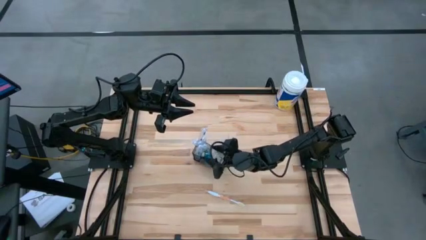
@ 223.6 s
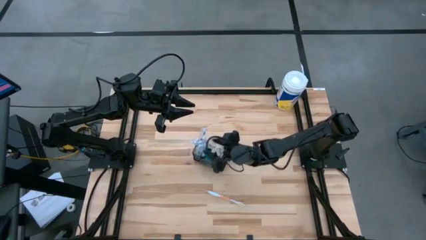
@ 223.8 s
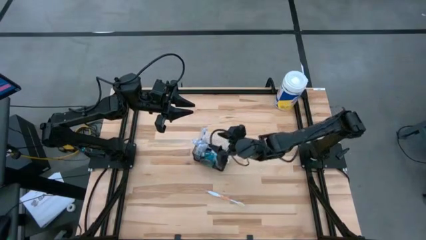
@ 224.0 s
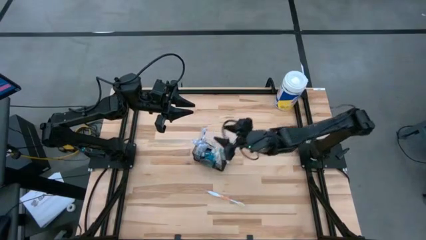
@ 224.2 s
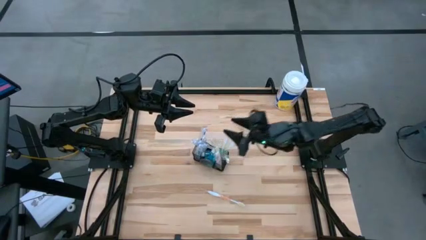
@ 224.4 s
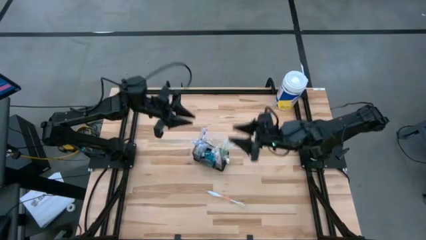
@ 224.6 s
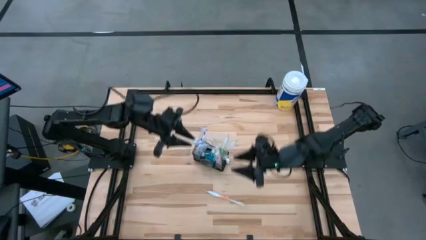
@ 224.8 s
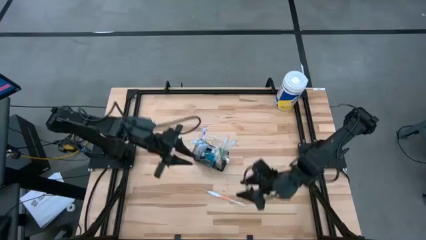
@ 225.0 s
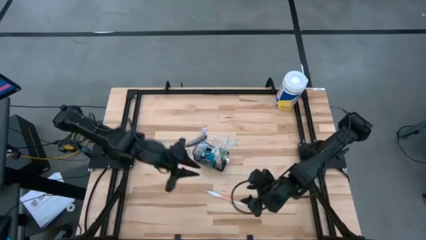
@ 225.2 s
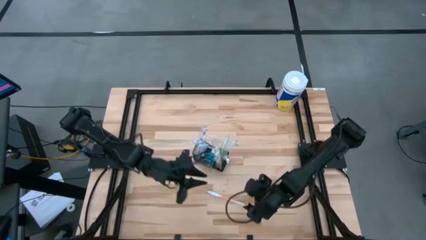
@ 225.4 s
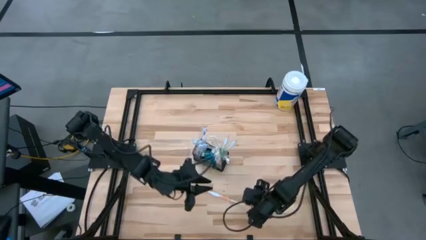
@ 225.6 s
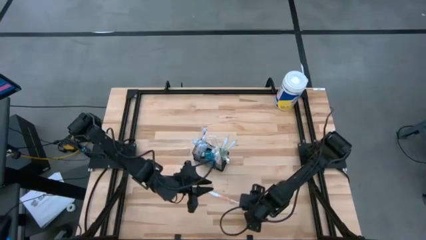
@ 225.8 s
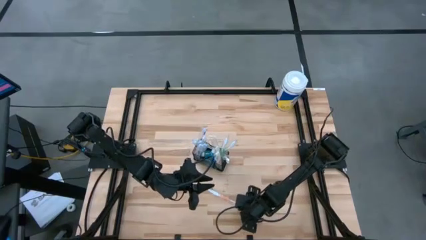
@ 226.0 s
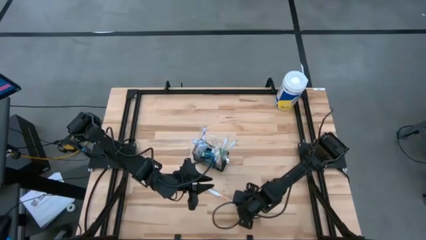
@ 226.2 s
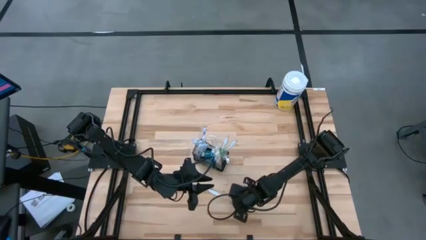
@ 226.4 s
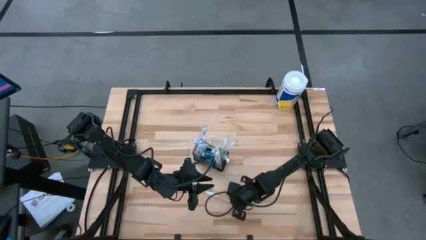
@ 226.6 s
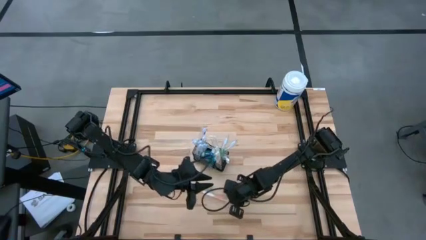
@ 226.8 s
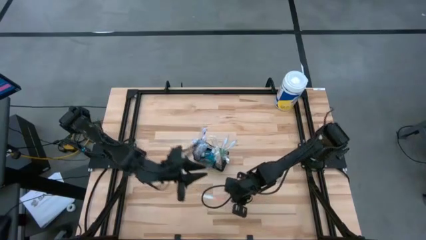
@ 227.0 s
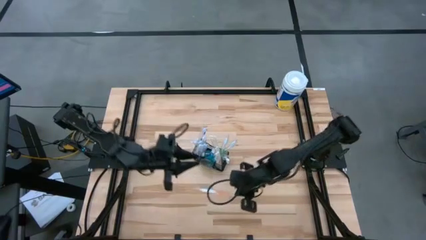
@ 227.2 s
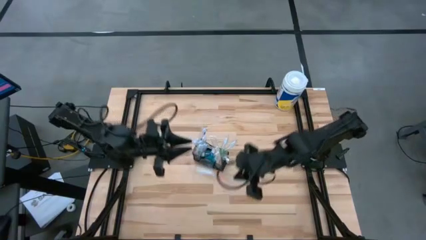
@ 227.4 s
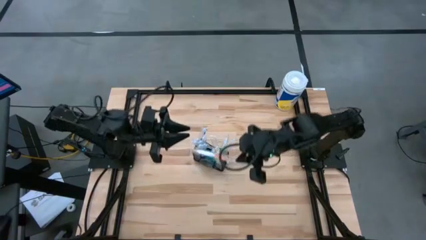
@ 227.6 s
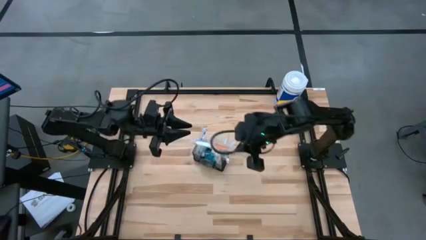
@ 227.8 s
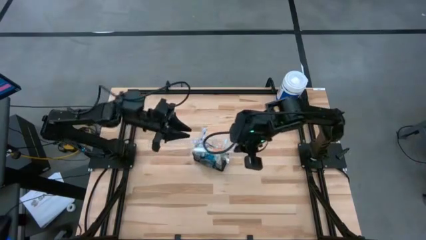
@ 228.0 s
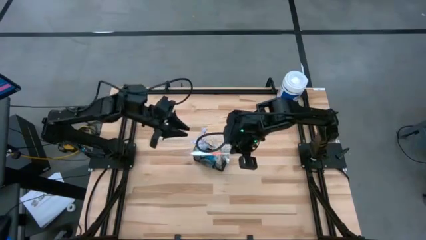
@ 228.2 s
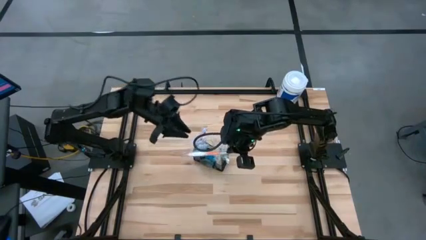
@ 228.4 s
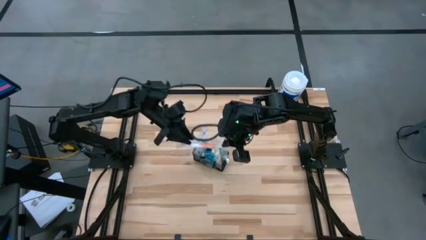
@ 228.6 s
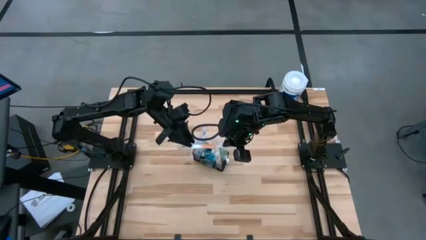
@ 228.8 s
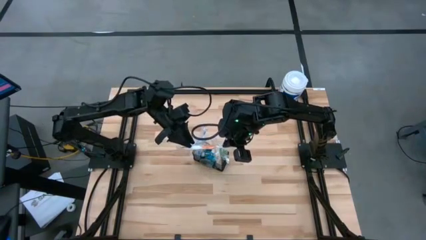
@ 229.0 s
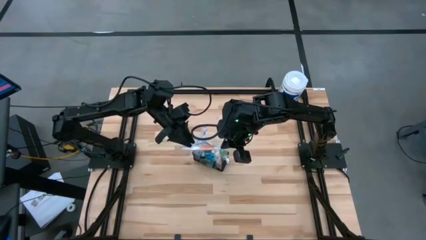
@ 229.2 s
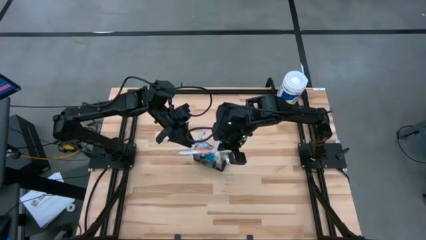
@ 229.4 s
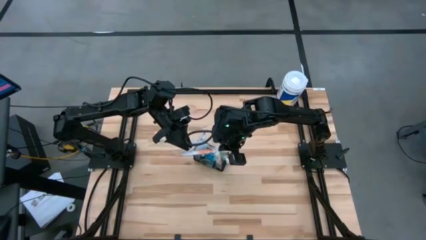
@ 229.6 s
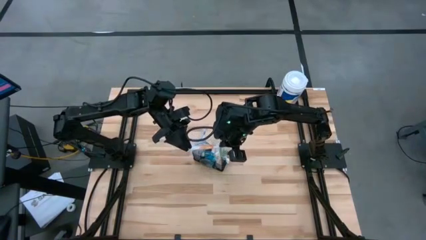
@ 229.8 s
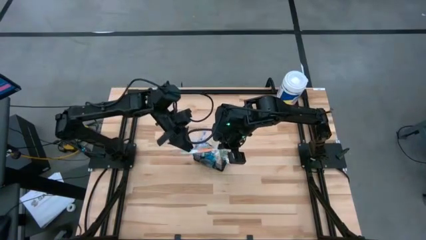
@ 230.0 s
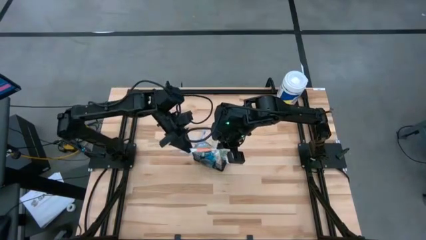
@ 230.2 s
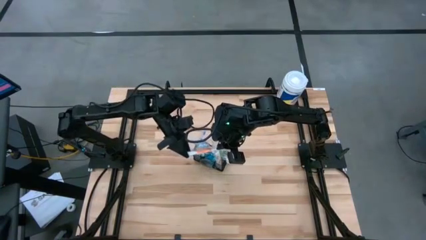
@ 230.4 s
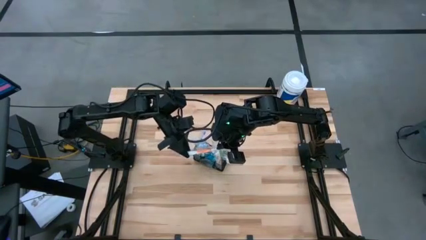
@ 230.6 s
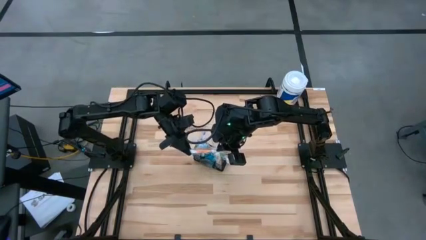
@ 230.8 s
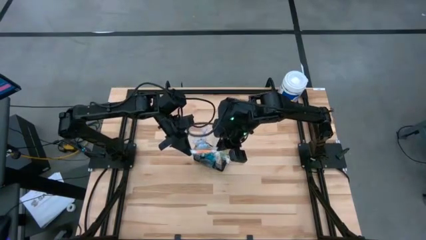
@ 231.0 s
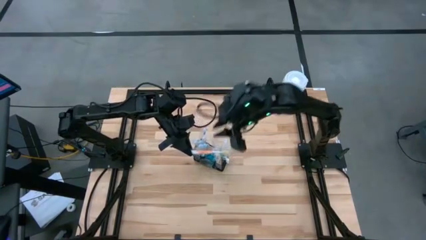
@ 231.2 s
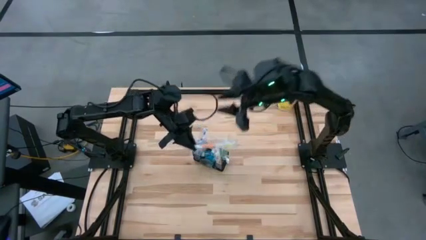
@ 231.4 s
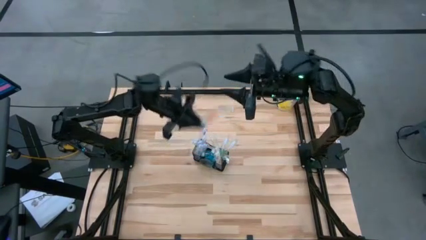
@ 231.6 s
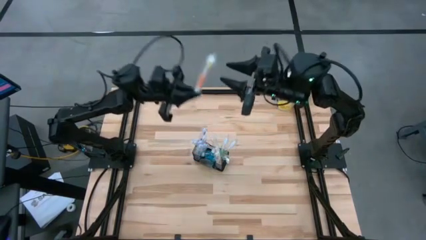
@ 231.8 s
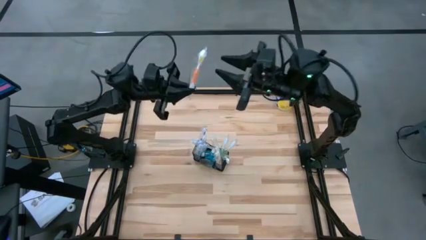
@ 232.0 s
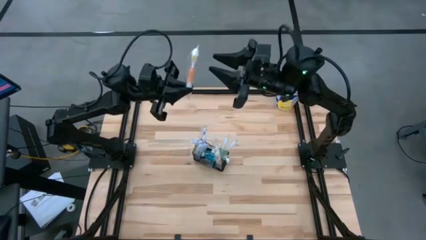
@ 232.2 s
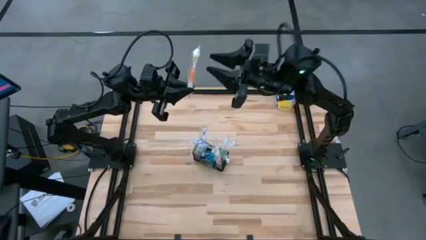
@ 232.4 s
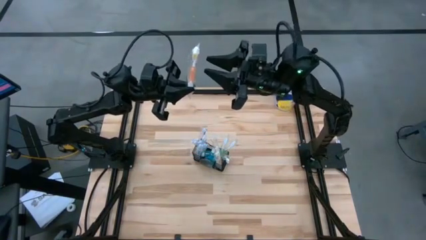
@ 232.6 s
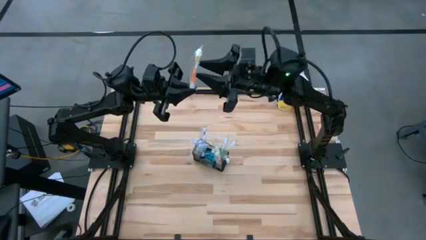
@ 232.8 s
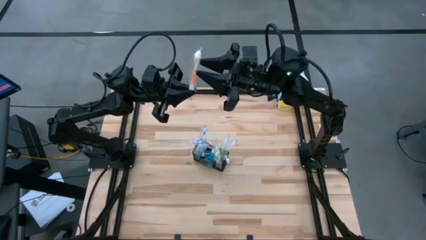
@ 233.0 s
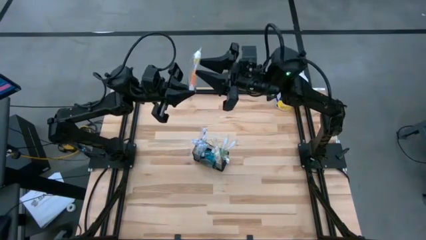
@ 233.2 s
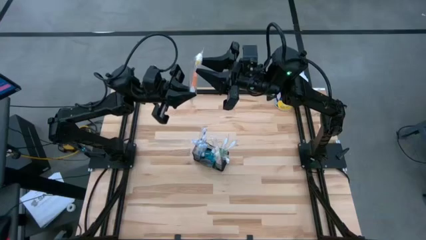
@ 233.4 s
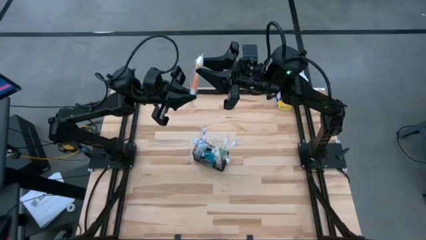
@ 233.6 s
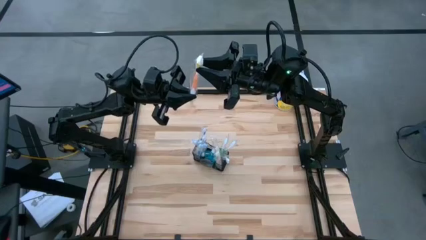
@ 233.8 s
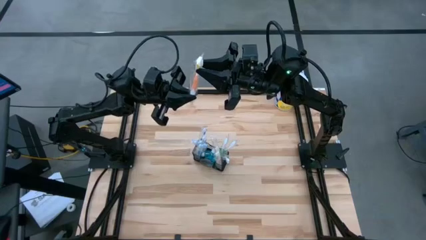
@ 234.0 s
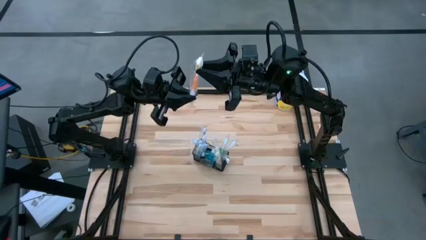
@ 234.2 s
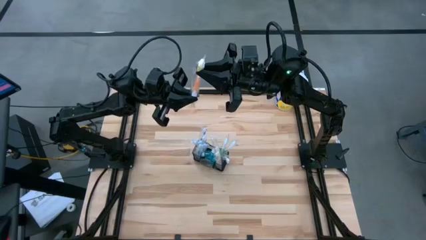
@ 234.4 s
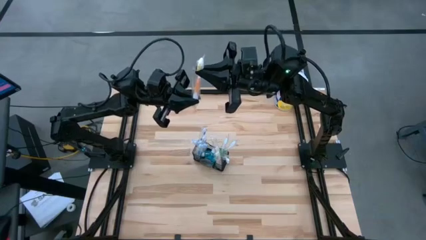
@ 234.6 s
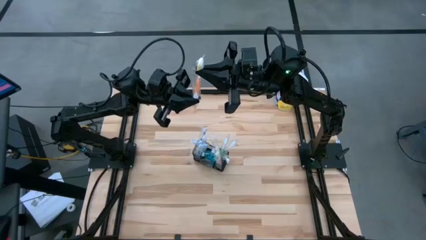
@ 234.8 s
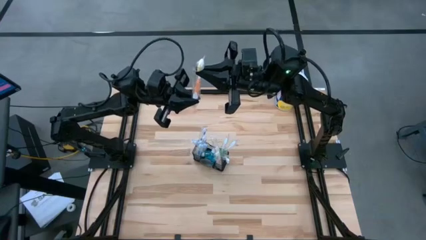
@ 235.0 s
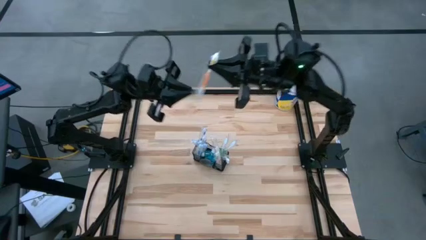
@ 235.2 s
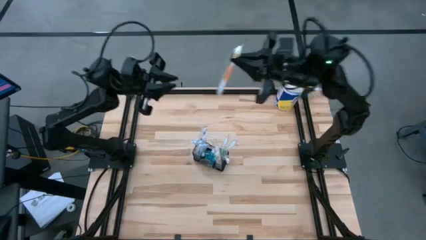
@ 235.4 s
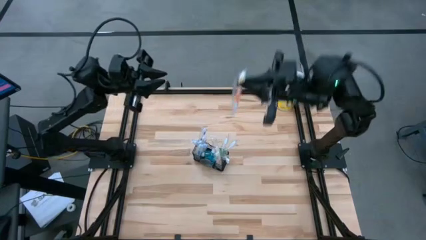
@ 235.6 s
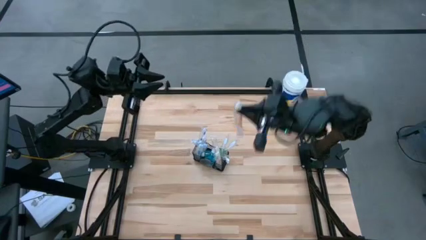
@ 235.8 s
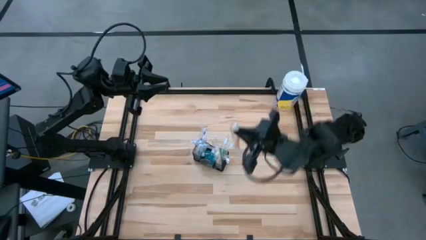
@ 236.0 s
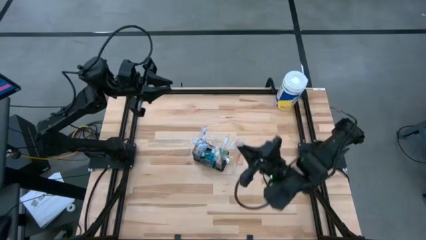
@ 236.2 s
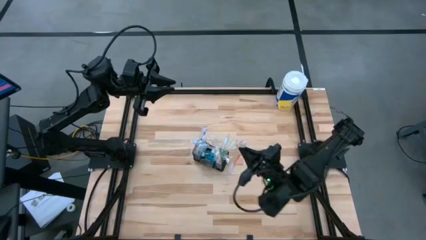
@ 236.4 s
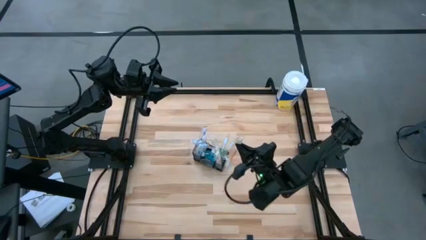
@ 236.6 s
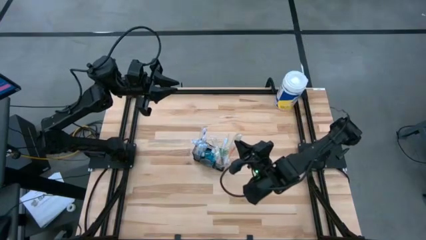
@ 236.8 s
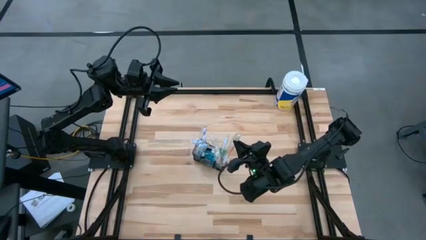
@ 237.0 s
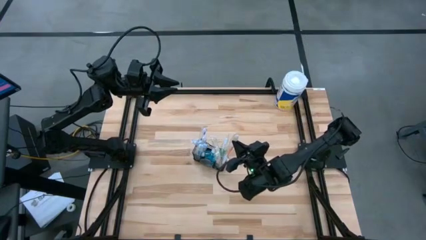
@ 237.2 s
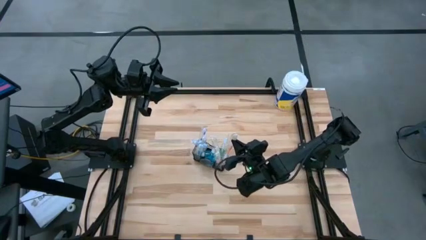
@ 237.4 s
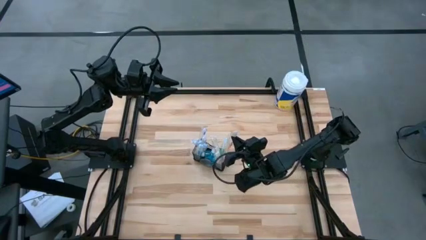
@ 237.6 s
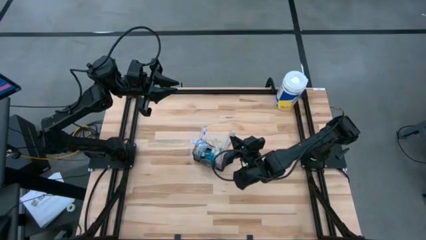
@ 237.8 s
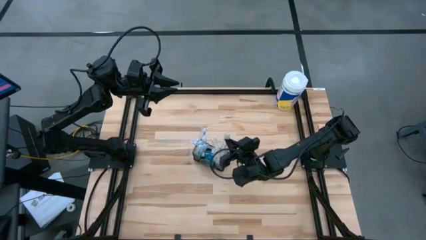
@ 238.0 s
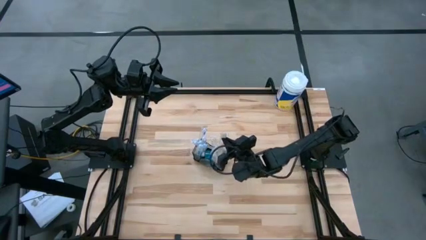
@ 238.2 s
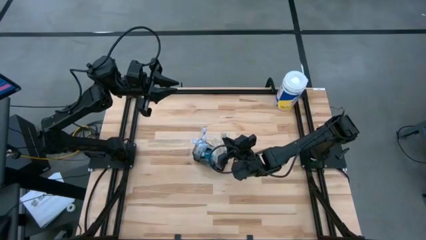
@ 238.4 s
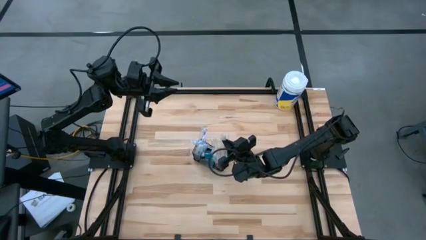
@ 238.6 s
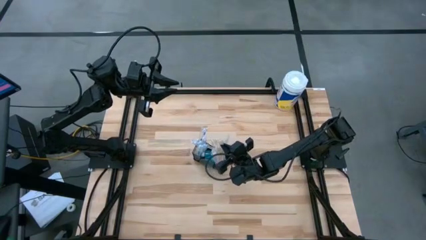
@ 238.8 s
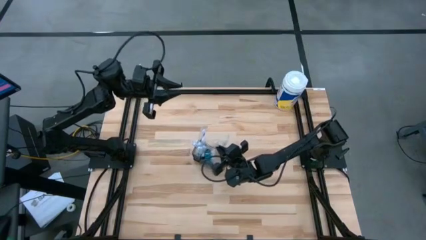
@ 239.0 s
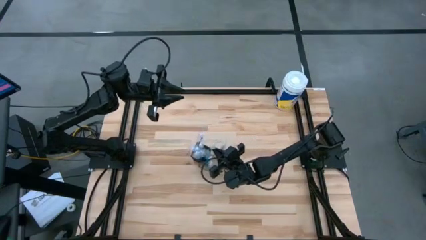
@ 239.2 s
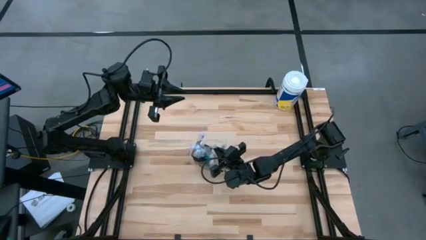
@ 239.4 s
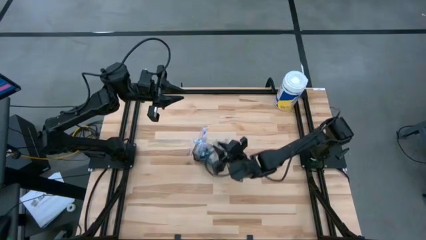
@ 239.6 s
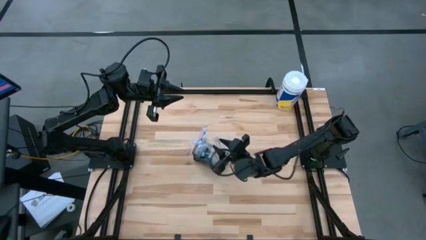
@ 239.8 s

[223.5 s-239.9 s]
Task: Pick & Place toothbrushing station
Put the orange toothbrush into the black wire organizer

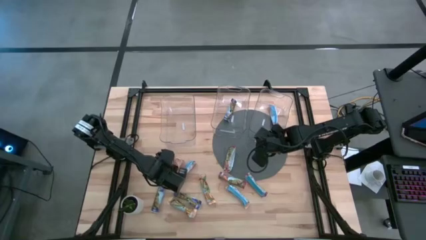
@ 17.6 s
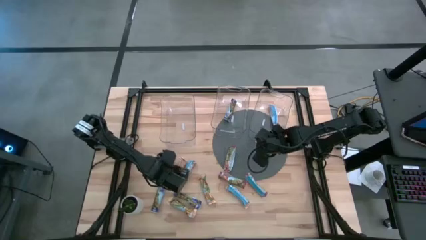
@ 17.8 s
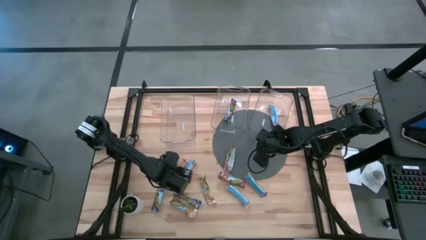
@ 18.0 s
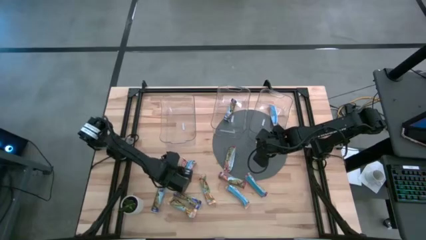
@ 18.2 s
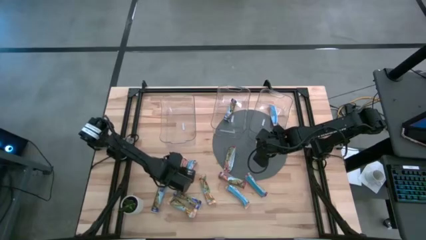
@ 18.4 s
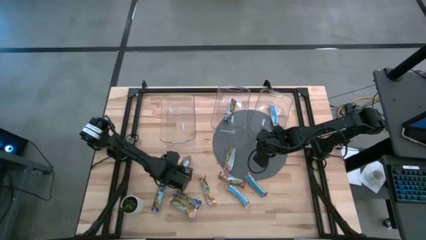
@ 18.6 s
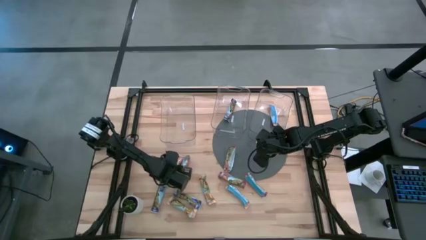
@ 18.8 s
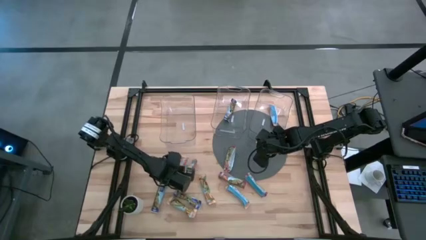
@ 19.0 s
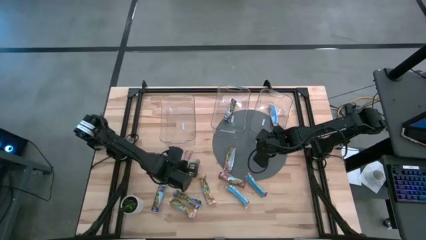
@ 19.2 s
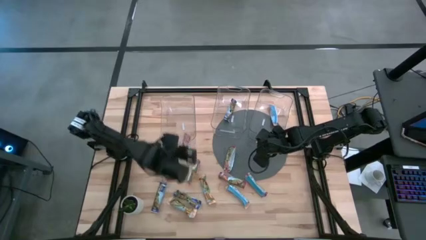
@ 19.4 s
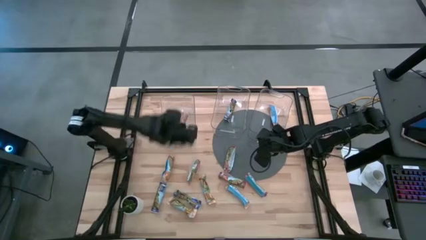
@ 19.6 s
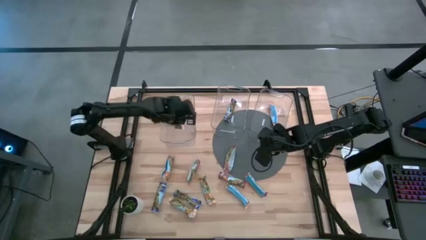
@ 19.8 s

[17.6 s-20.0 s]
Task: Pick and place Granola Bars by type
Put the red granola bar into the left transparent bin
